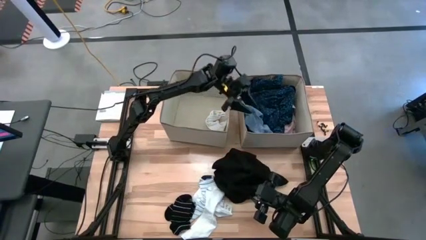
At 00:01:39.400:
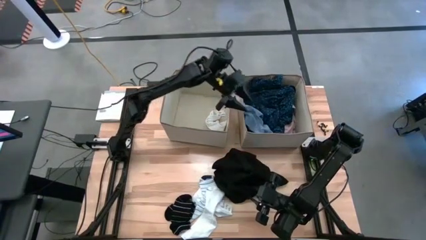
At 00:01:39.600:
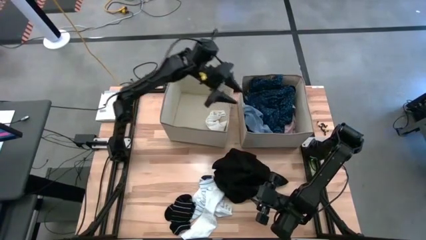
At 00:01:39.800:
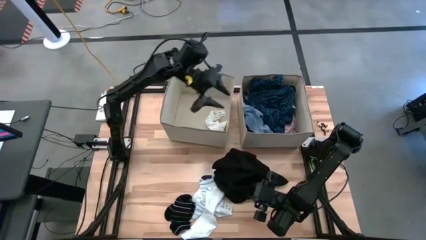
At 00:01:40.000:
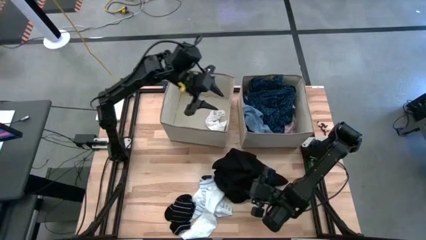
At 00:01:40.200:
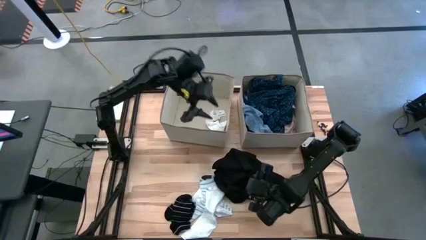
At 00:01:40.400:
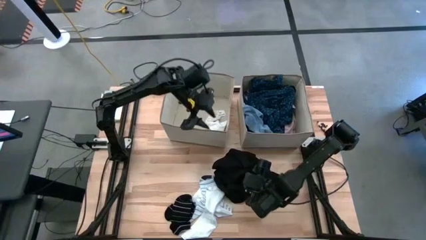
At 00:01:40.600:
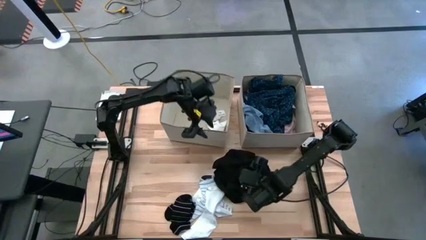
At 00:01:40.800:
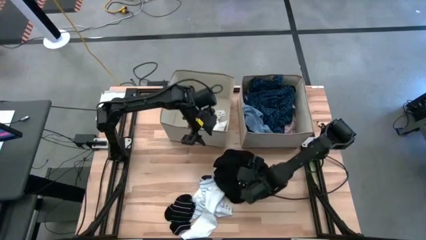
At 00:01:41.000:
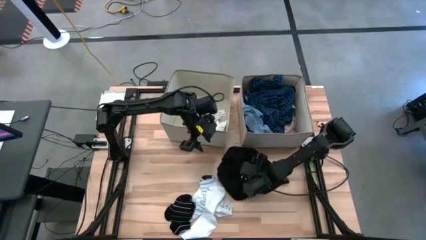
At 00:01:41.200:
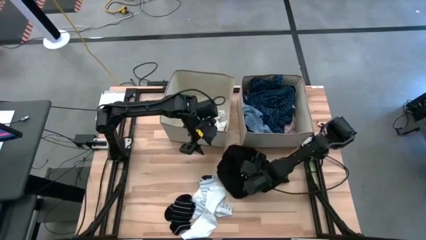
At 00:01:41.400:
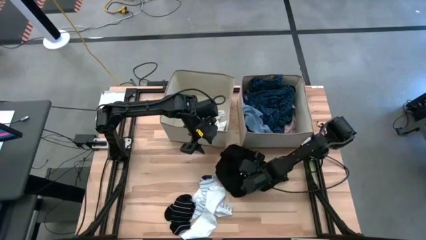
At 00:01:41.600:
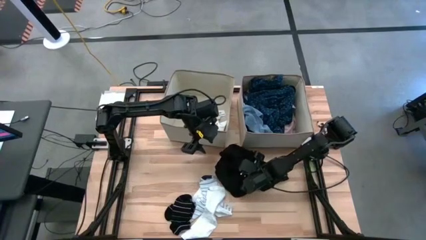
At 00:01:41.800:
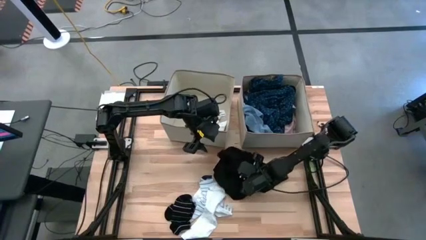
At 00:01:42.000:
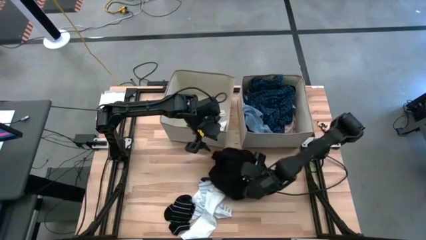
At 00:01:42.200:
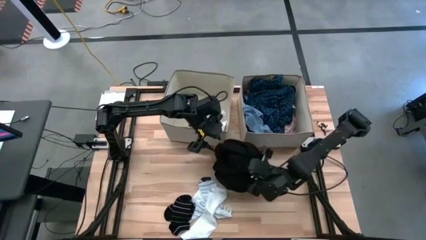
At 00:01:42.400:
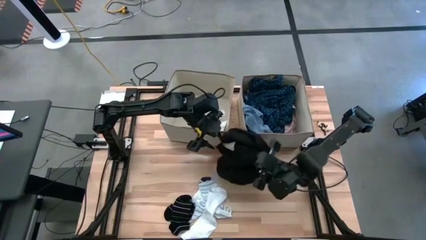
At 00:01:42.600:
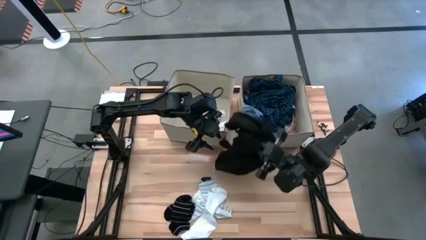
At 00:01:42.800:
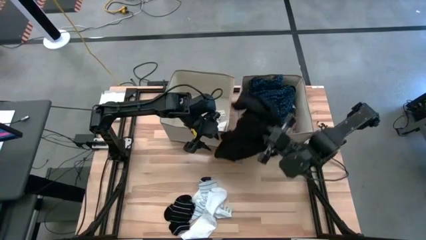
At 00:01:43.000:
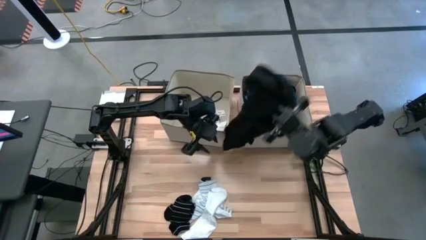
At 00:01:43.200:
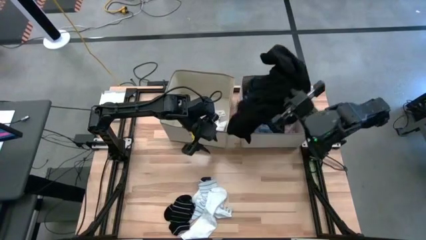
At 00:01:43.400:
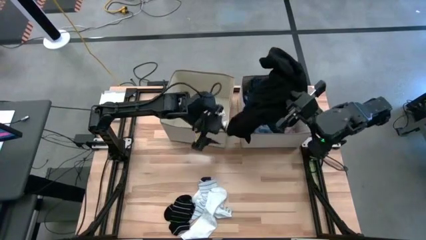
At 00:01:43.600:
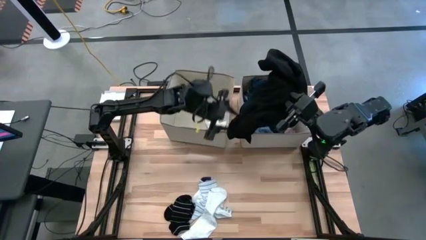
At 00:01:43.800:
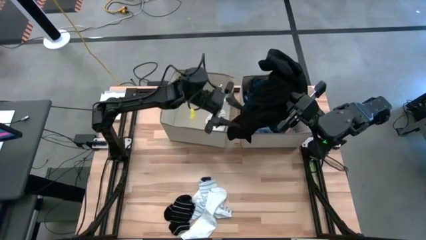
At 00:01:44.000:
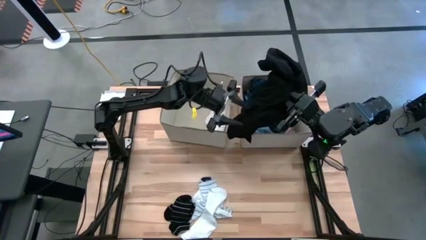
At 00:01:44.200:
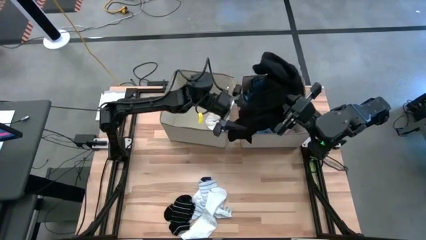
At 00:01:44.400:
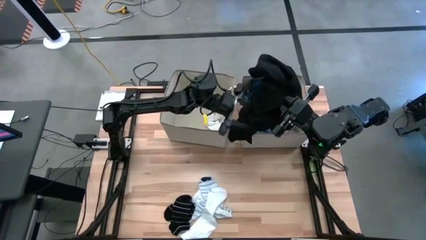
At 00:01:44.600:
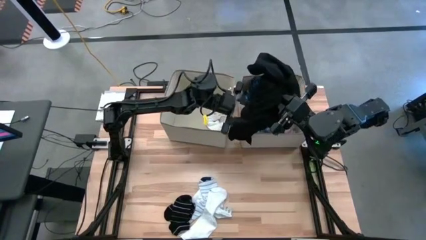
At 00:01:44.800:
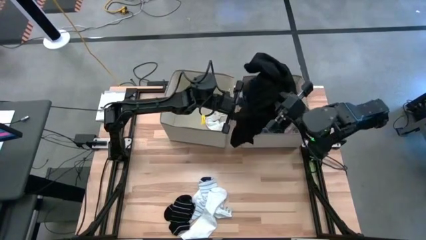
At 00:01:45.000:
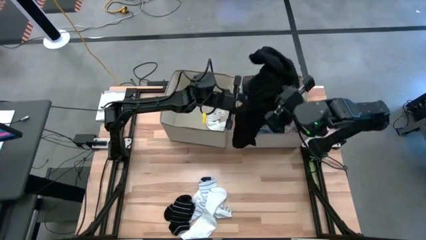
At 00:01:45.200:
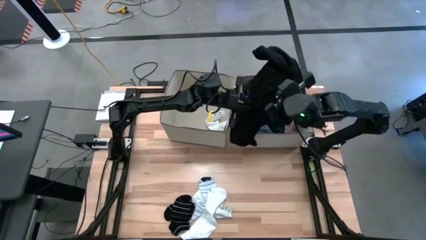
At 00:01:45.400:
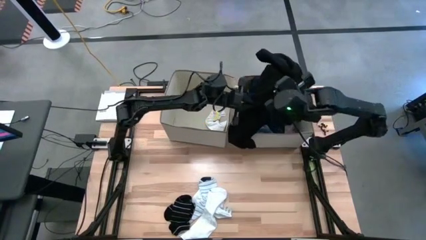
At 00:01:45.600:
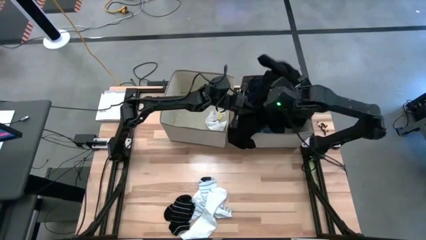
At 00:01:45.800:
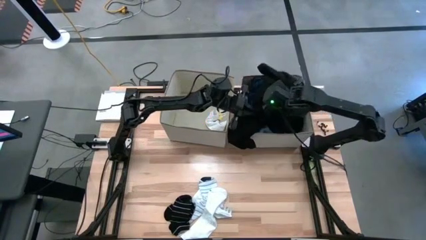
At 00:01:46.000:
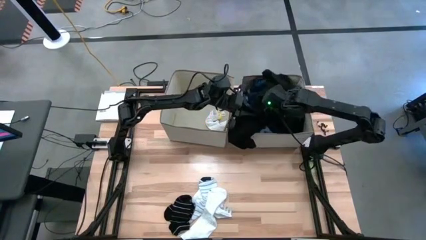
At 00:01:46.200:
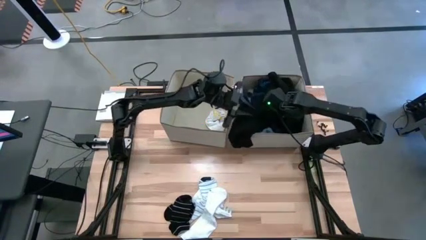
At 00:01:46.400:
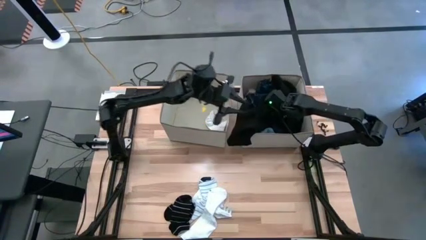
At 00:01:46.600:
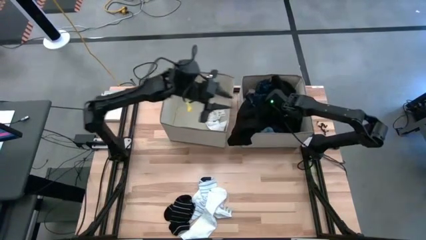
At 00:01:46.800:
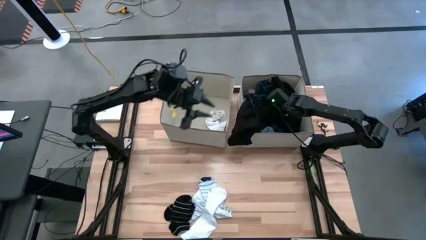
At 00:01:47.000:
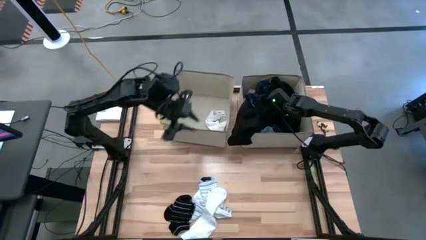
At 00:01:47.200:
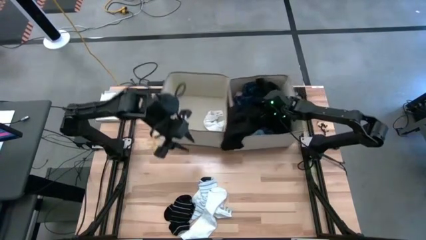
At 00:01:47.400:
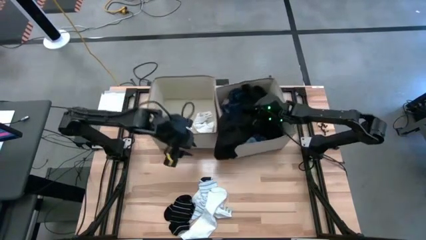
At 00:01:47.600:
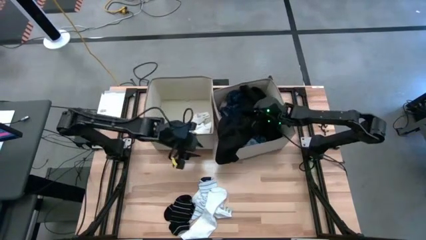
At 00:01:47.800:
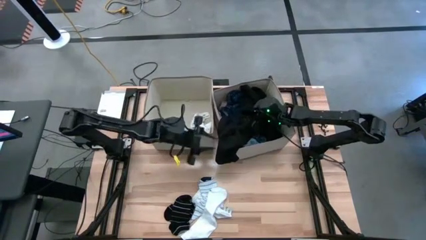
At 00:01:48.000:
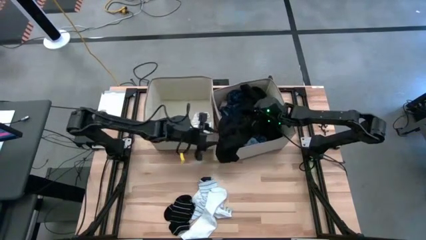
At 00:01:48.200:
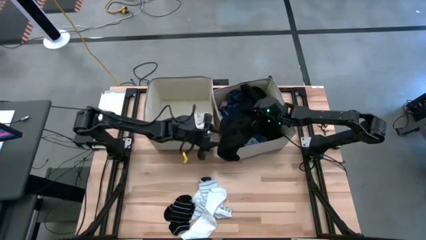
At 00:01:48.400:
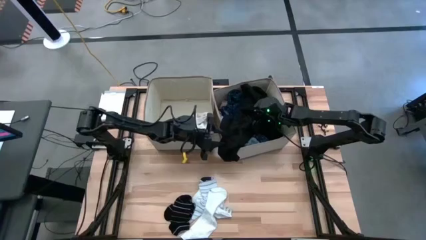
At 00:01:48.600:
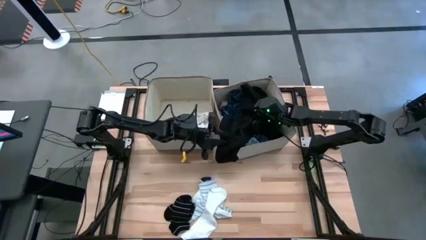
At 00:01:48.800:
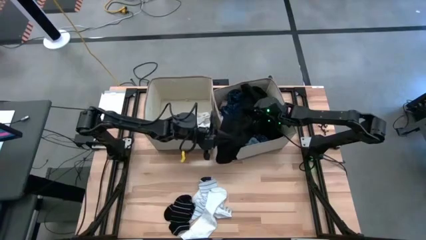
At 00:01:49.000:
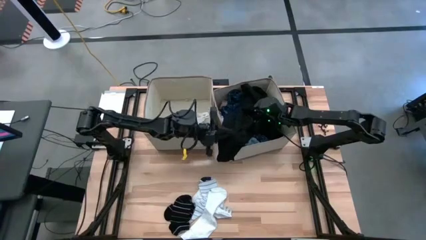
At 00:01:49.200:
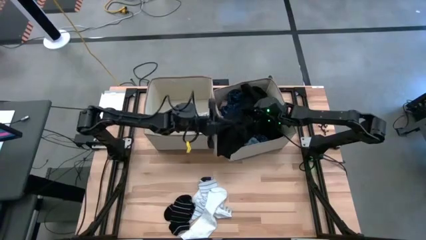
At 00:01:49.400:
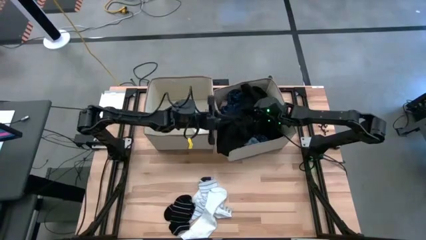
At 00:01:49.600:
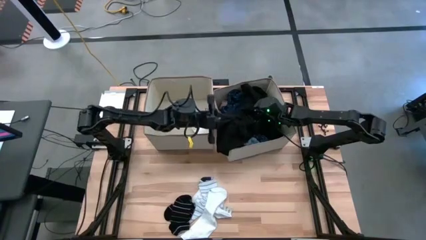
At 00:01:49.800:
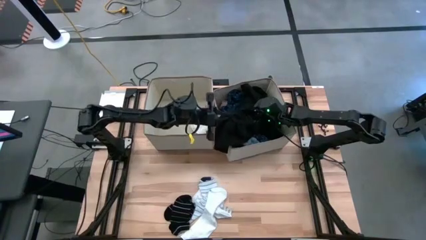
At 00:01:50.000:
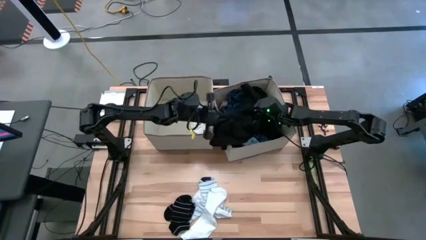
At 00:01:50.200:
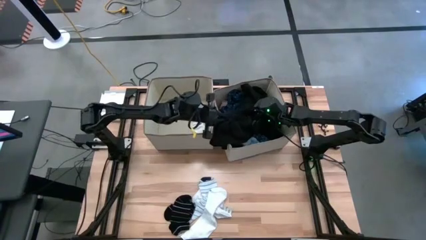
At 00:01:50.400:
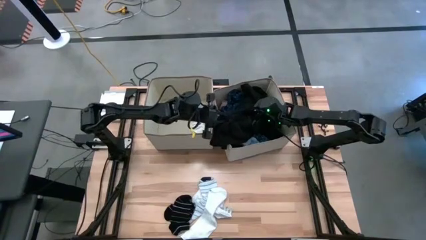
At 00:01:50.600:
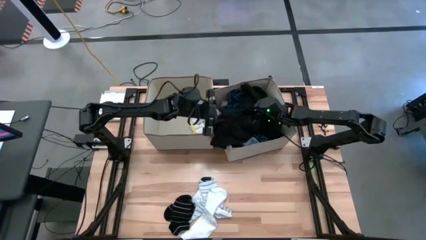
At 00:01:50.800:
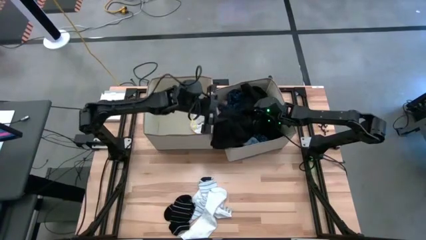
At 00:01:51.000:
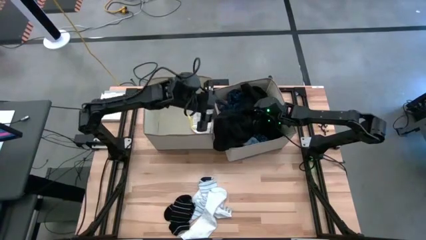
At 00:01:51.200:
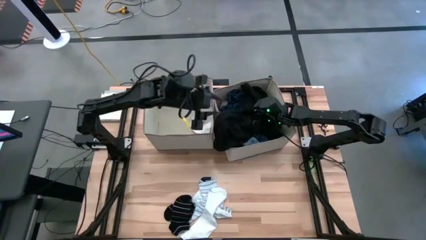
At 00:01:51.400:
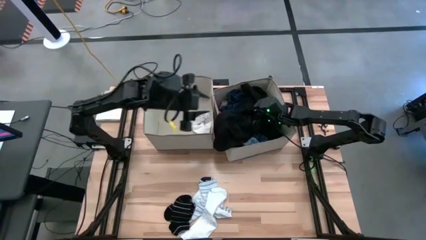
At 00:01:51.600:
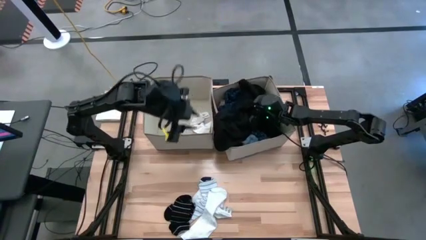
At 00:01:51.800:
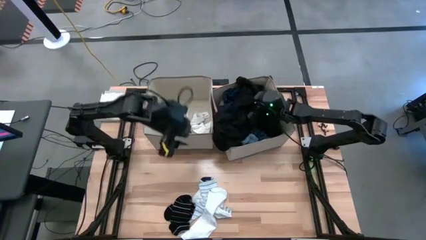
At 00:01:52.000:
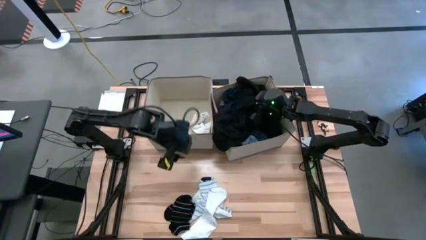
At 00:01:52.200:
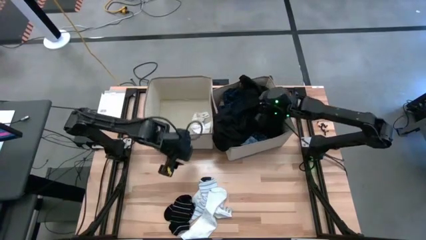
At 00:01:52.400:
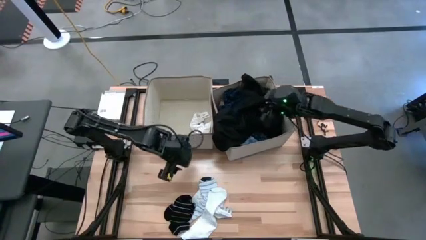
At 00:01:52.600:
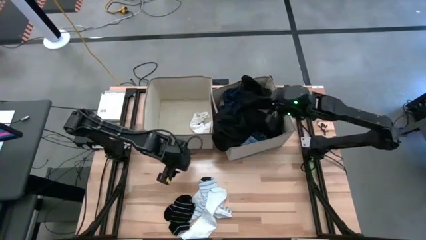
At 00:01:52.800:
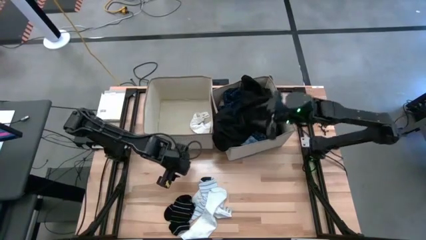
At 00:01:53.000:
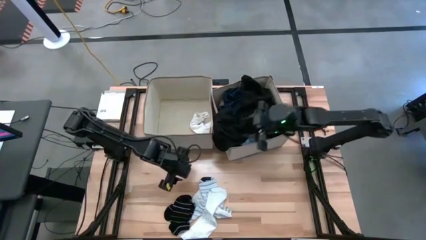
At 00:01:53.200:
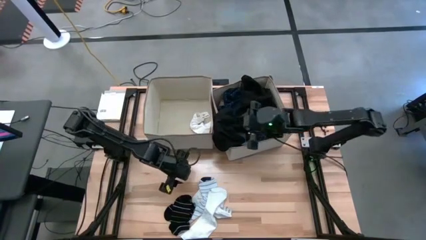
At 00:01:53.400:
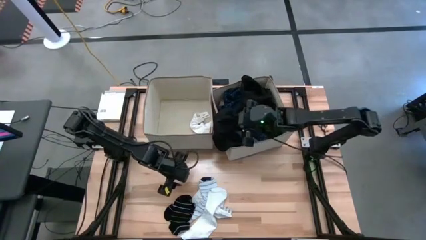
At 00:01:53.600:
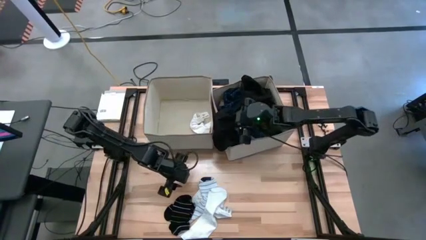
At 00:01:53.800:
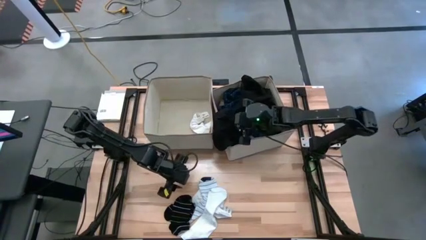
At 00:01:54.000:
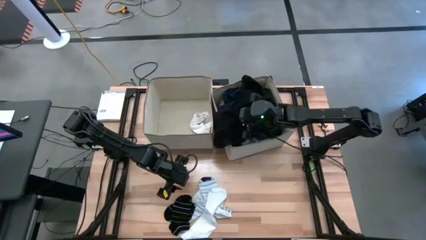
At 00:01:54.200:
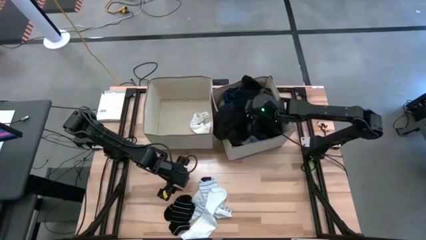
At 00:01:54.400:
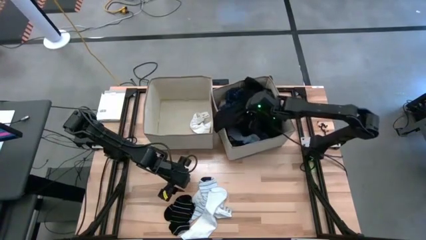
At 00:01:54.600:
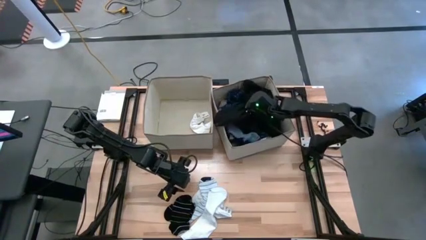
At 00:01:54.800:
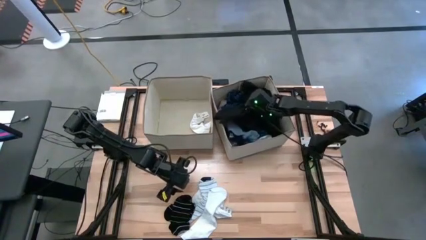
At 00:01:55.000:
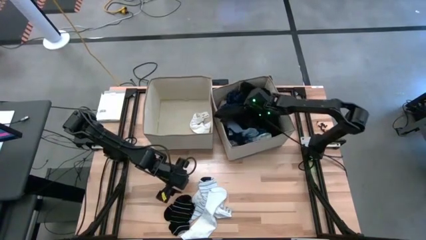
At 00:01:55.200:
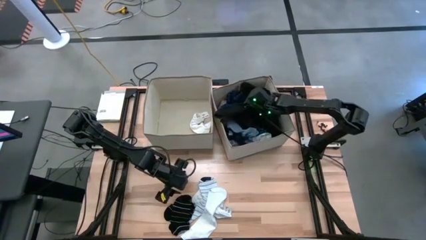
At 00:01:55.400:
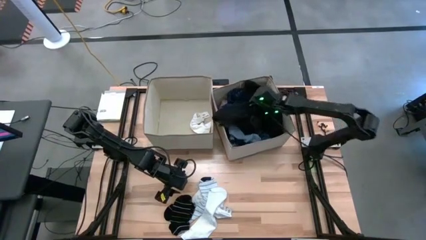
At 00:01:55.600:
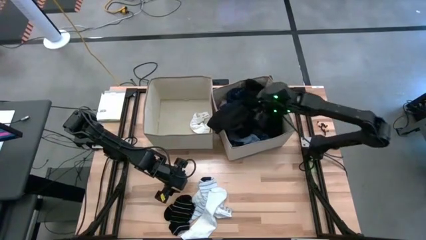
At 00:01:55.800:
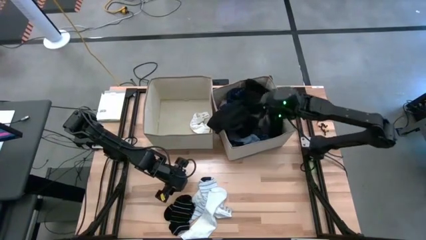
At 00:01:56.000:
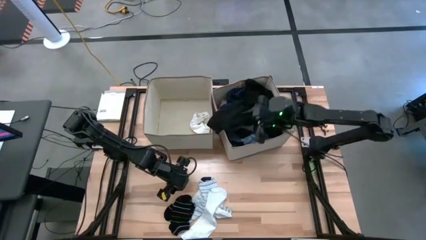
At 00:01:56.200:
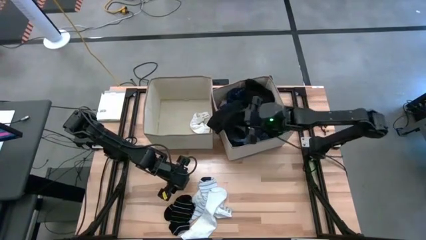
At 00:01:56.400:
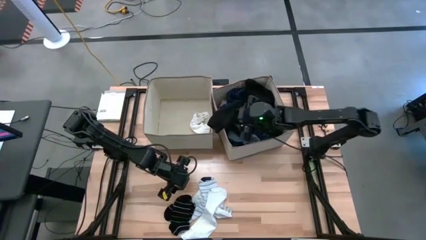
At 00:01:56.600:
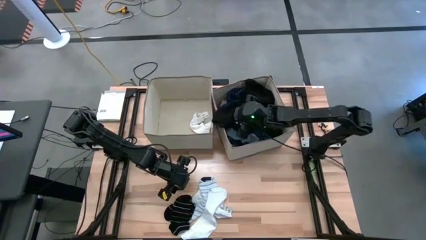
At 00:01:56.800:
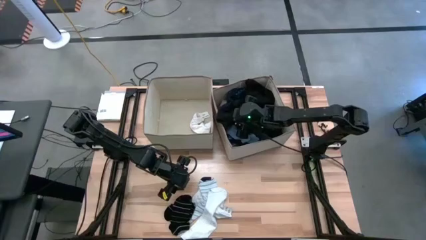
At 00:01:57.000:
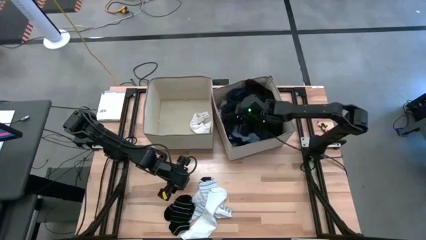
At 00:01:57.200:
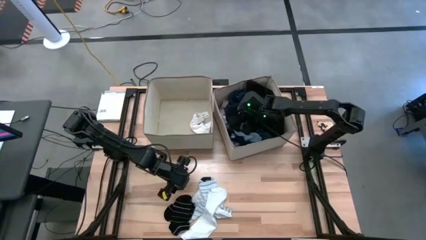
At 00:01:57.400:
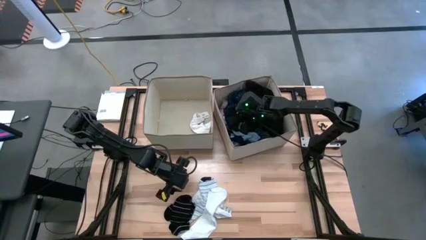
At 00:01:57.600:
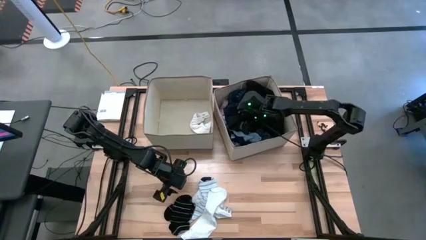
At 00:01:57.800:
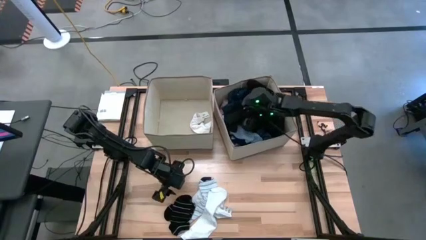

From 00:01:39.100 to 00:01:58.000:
Task: Sort clothes
Put the black shirt into the right laundry organizer
